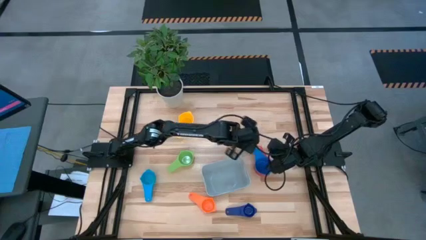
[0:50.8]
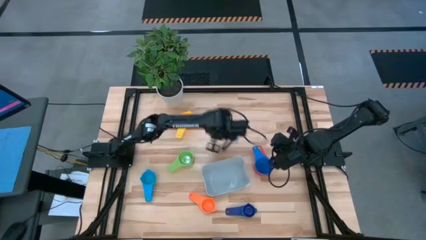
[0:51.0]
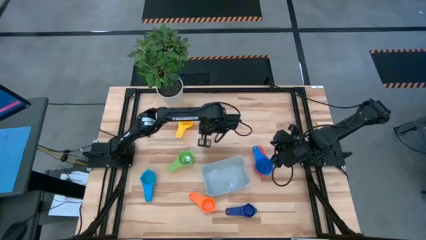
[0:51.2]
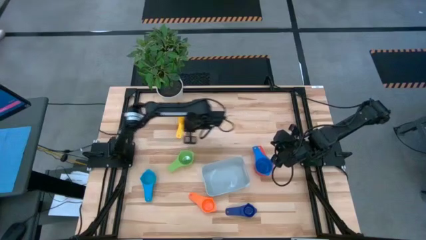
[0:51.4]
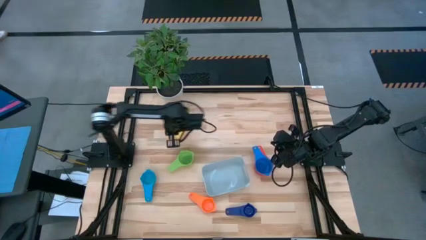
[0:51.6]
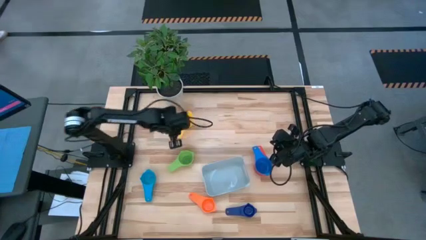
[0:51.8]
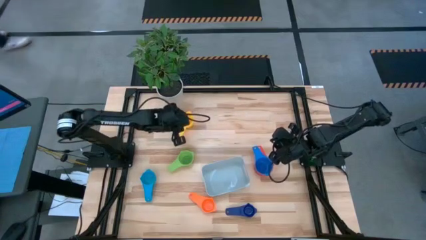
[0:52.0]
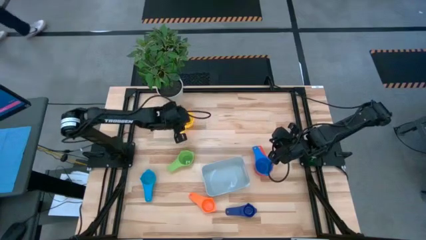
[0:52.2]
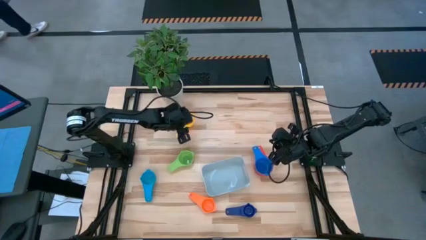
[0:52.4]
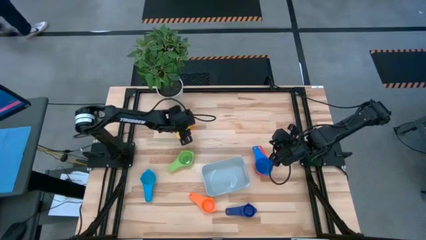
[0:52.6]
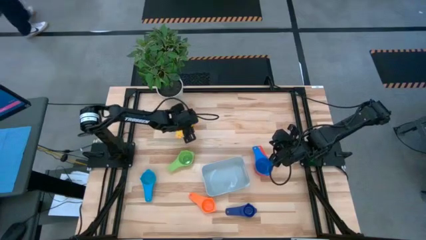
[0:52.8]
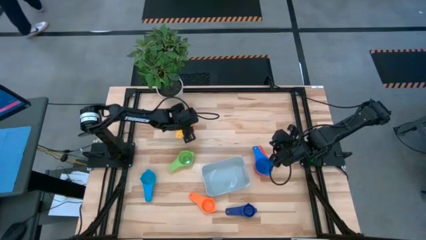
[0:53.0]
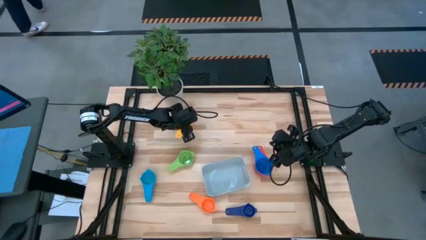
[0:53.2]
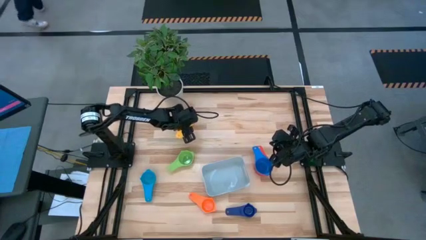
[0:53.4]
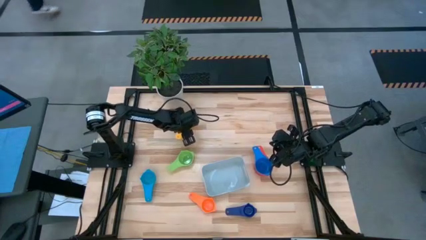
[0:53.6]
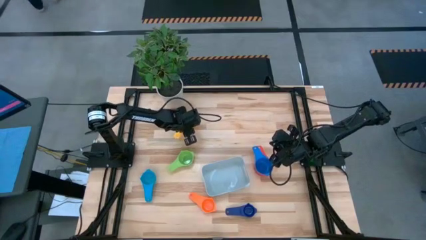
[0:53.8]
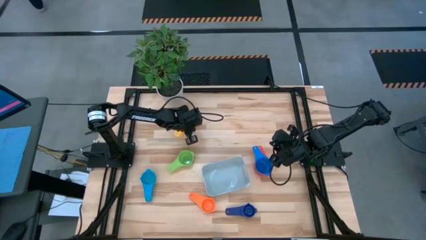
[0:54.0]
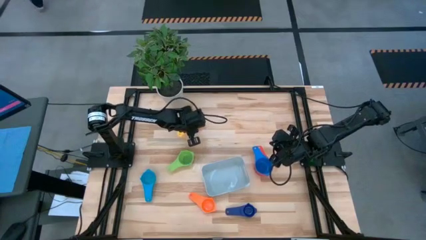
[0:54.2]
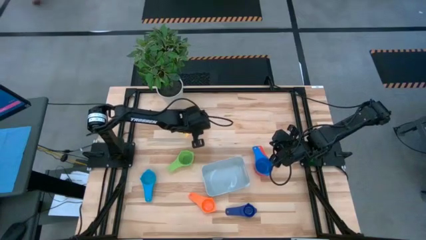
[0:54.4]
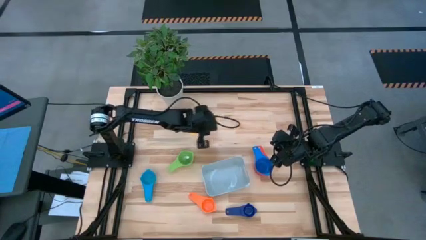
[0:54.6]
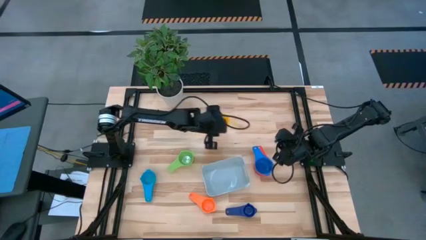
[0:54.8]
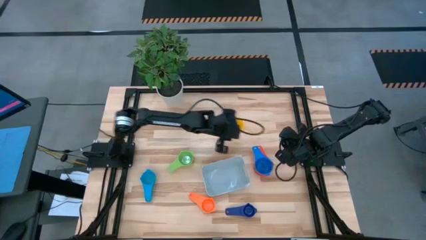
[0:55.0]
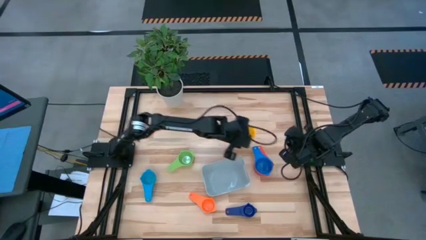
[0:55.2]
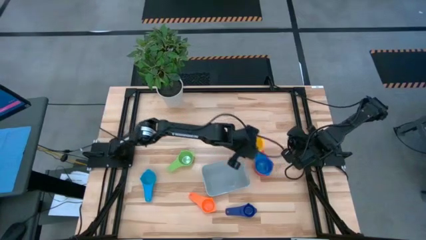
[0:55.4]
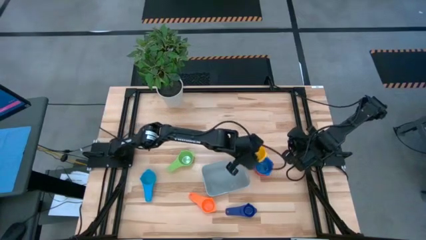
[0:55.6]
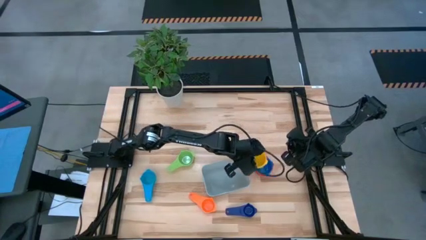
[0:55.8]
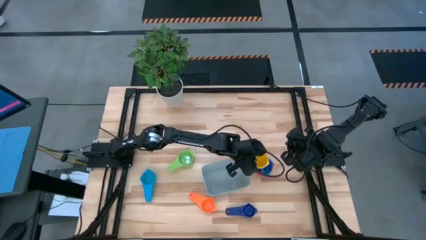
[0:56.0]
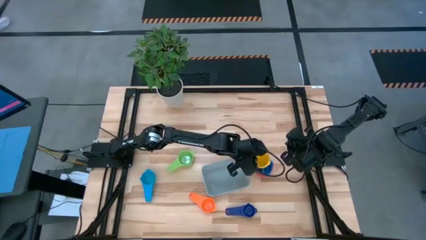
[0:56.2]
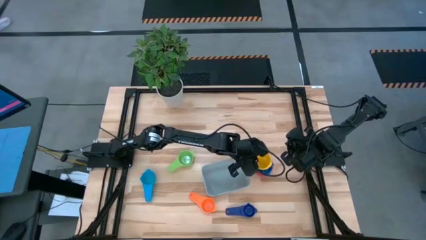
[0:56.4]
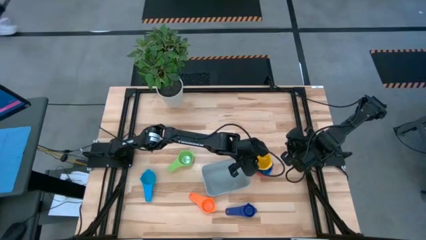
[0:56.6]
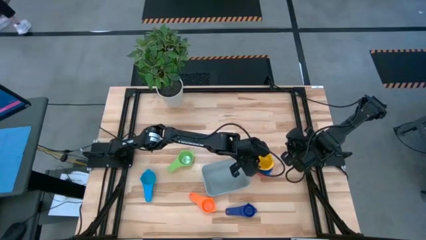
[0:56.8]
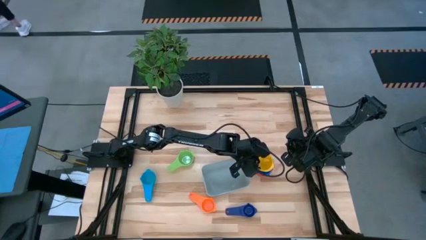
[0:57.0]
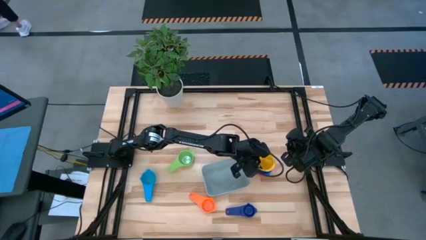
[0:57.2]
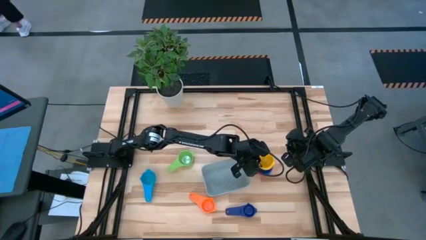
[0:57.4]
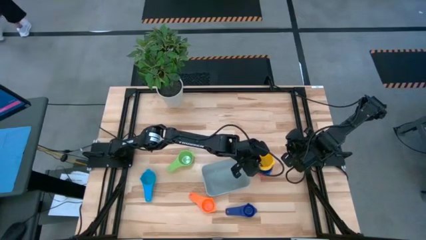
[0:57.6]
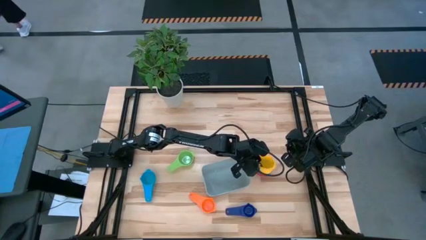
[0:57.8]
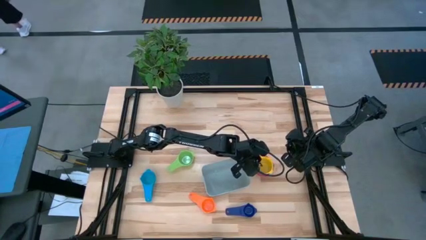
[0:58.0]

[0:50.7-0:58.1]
Task: Nest measuring cups in basket
Stack the yellow measuring cup on top of the dark blue measuring cup

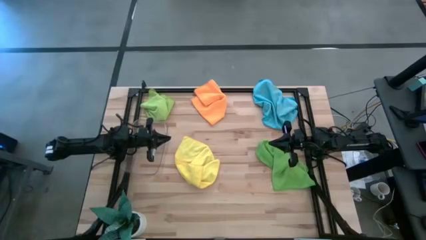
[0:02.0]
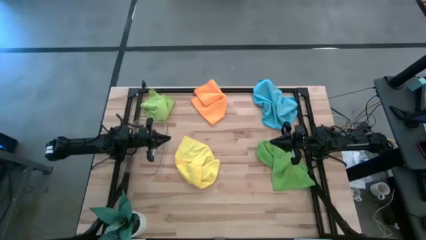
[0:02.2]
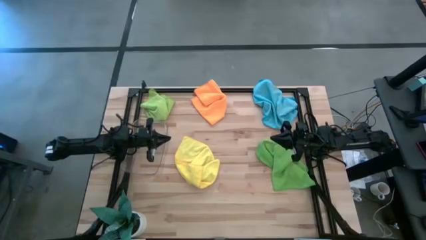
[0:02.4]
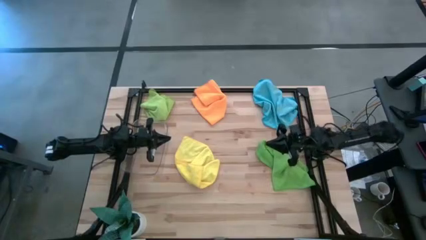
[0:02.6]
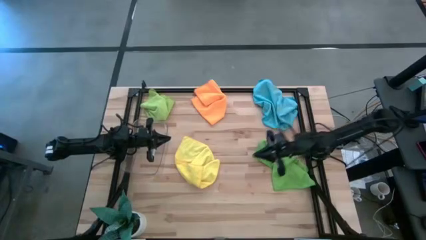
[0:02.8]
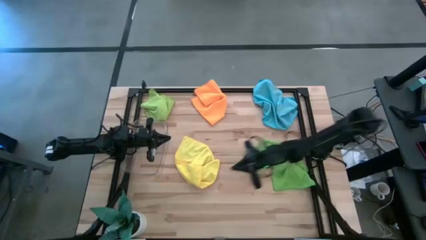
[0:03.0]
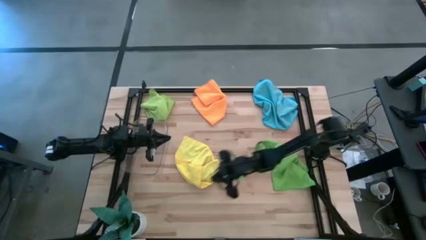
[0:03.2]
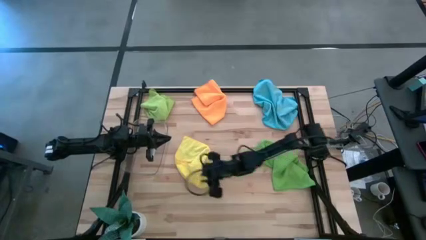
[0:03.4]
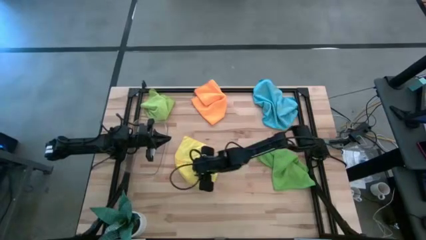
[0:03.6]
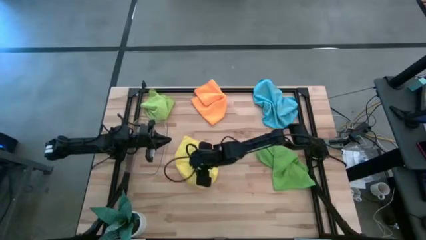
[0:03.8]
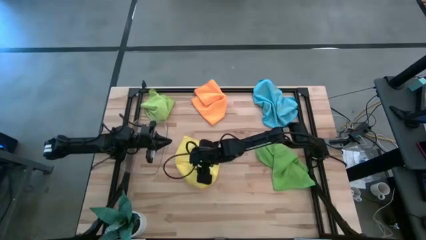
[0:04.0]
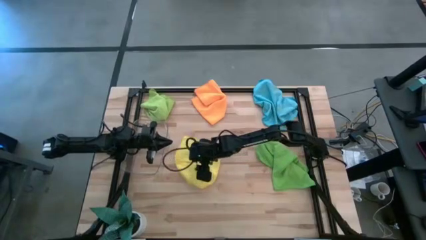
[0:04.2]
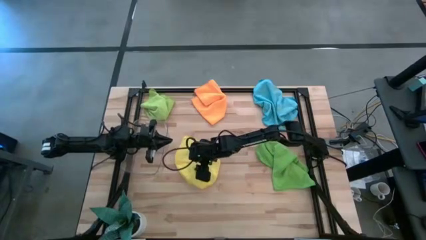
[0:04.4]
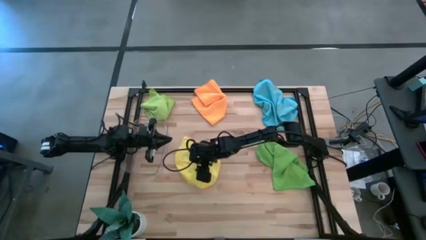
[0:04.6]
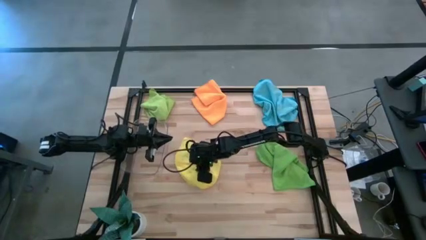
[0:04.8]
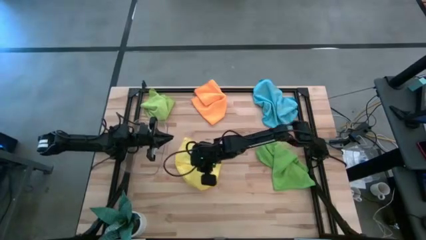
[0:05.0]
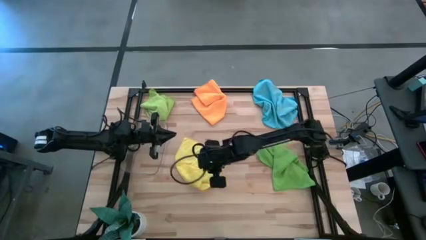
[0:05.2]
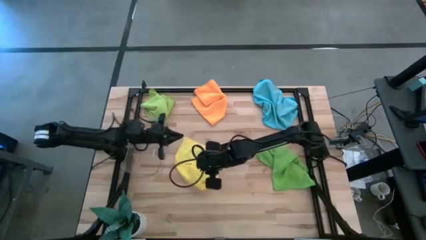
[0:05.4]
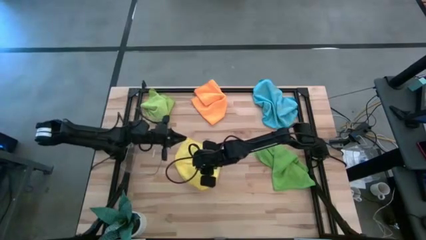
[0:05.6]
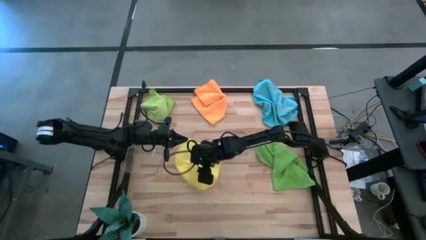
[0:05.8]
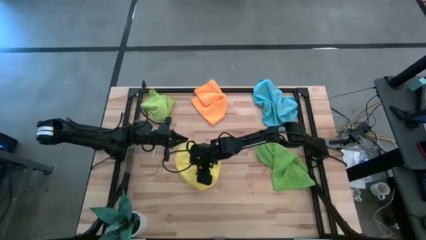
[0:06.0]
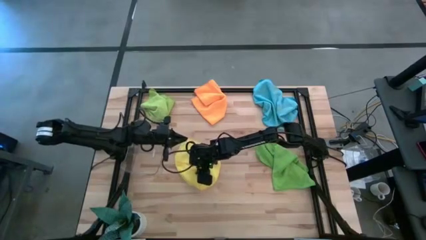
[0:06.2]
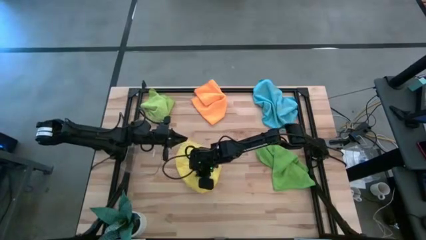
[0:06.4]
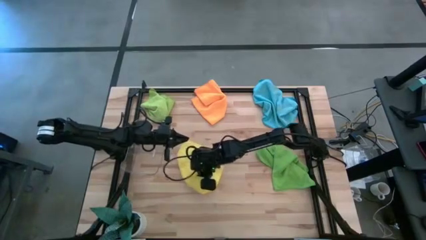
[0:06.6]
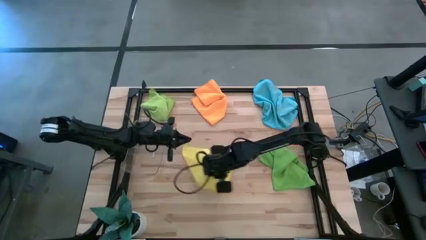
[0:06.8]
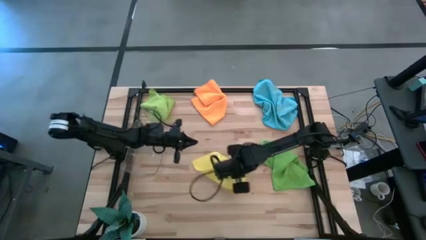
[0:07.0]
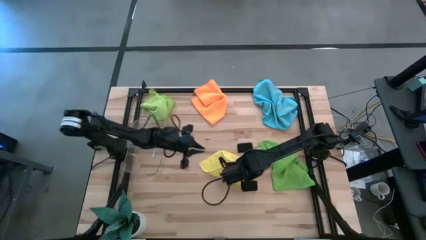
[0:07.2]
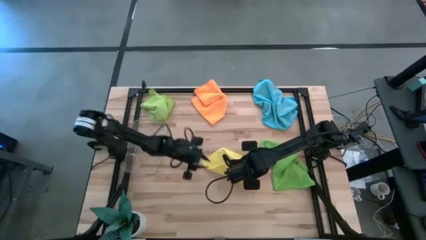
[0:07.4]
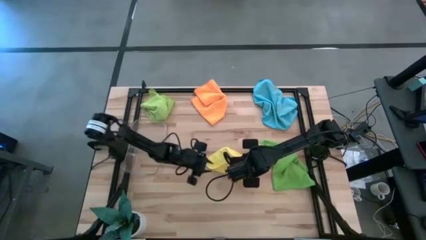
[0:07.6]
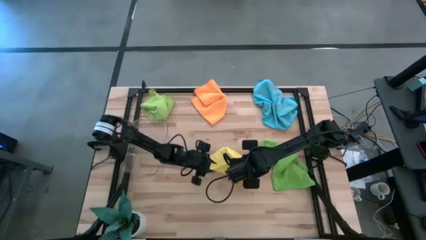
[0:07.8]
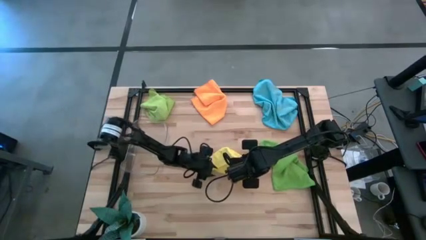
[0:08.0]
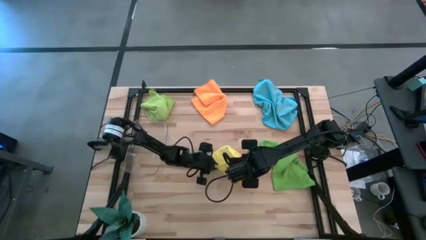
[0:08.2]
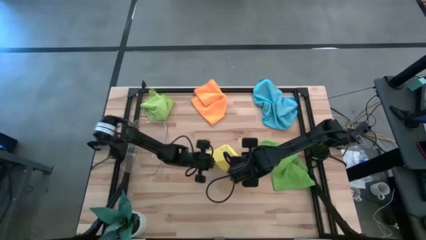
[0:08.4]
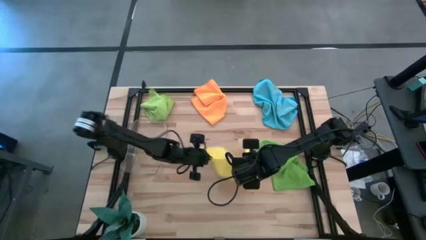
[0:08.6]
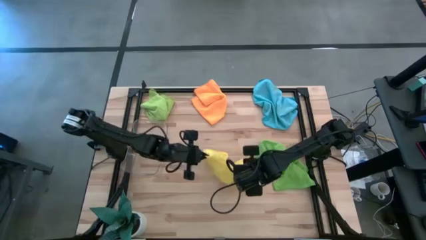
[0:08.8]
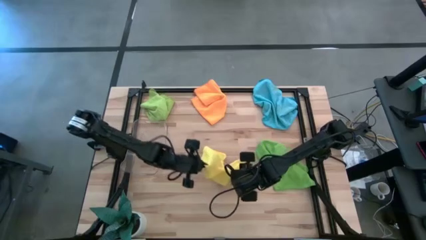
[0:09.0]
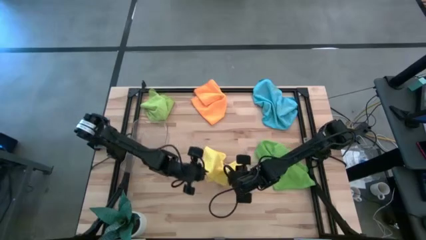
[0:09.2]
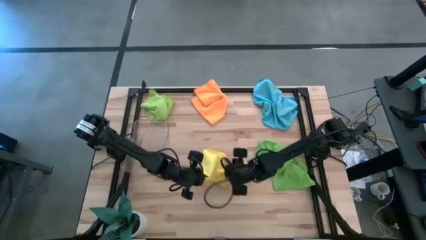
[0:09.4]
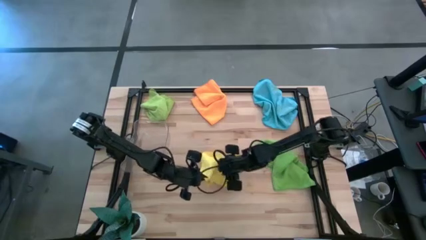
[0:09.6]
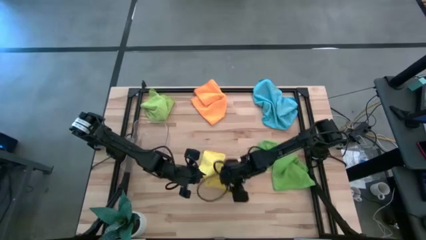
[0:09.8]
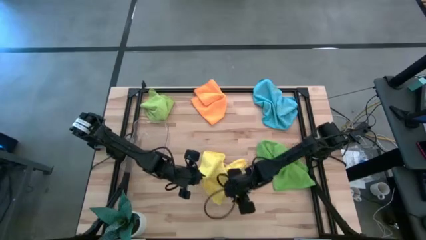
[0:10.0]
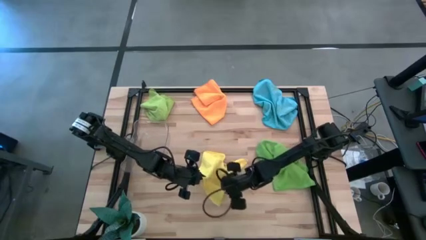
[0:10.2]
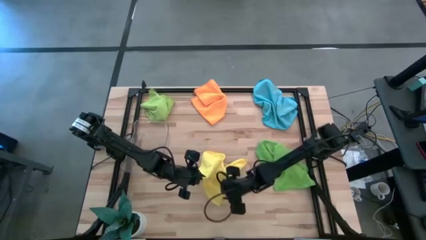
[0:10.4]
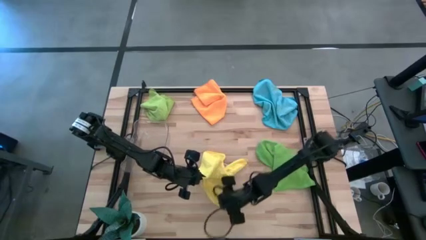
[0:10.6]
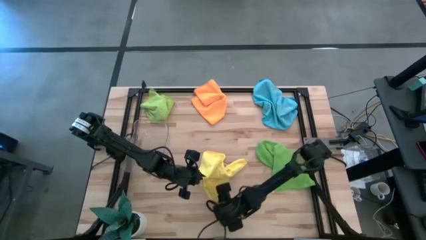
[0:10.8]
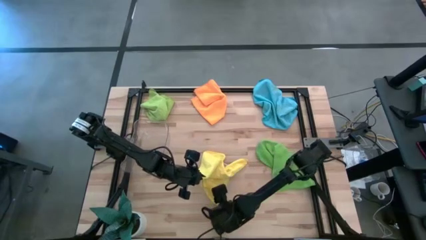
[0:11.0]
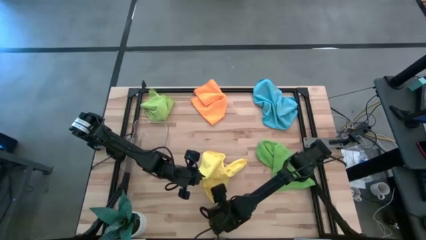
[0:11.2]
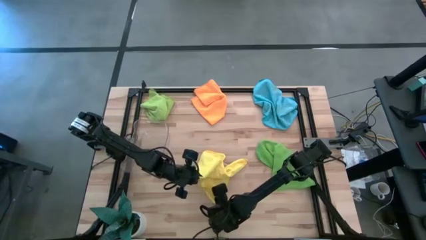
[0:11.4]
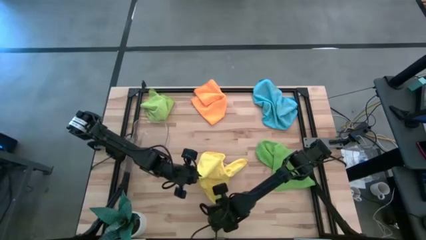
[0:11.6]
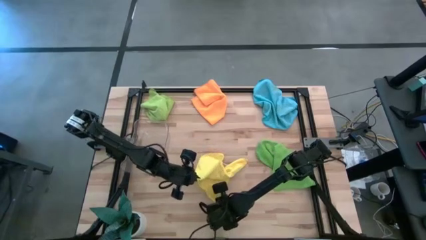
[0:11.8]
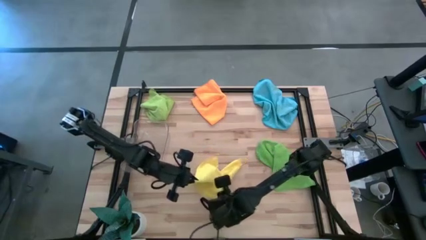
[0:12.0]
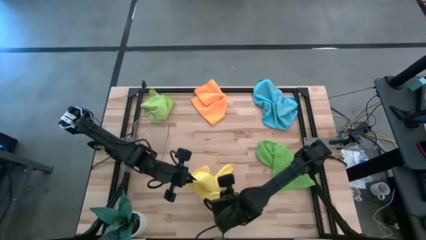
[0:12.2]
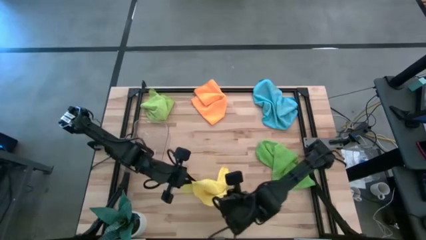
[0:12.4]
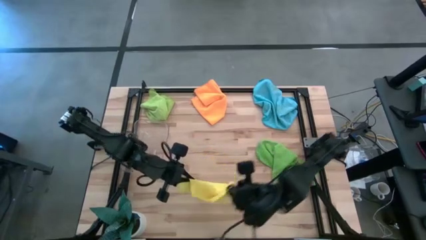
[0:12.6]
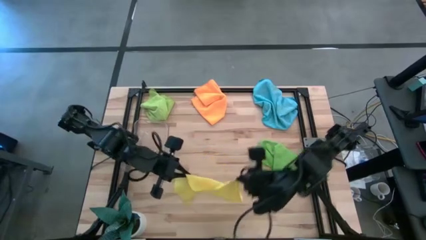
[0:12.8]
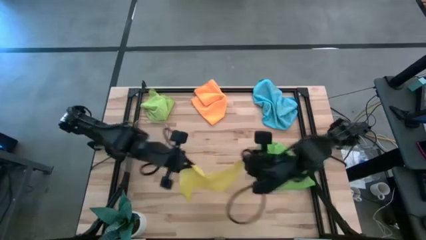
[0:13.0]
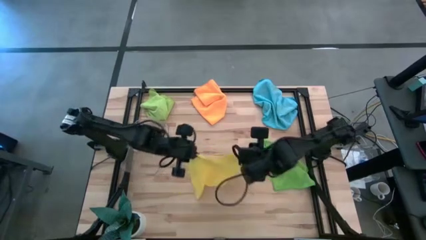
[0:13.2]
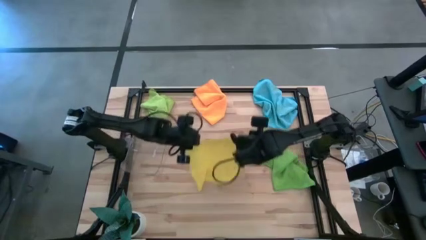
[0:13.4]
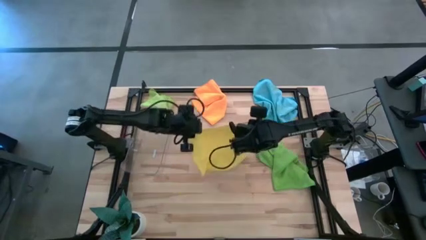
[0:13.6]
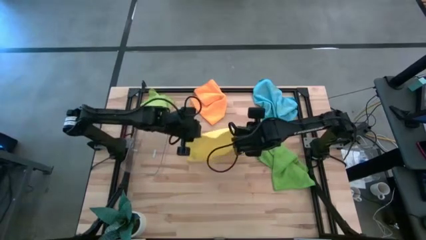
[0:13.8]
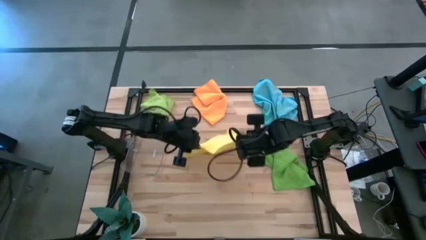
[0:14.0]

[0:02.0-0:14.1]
Task: Fold microfiber towels
Fold the yellow microfiber towel on the table
